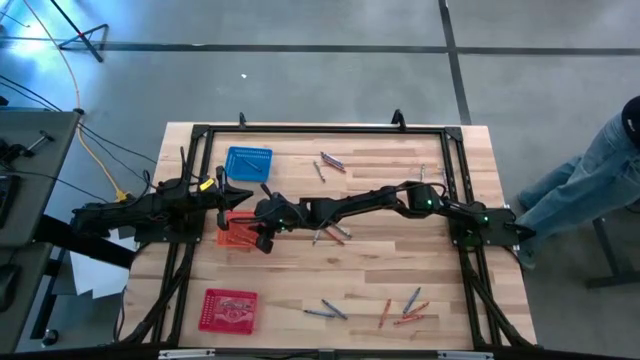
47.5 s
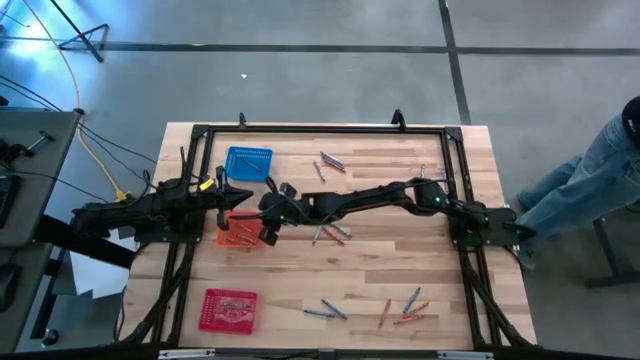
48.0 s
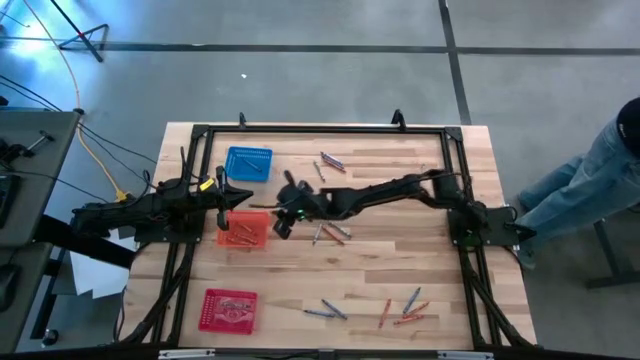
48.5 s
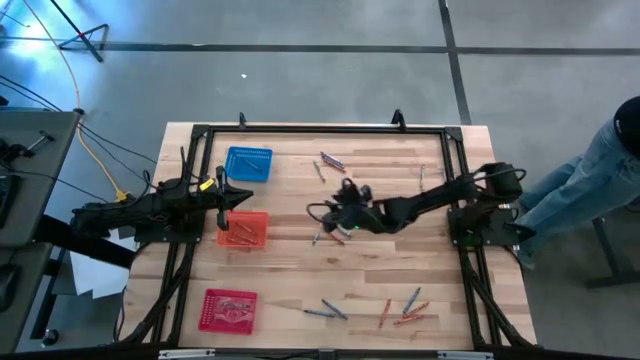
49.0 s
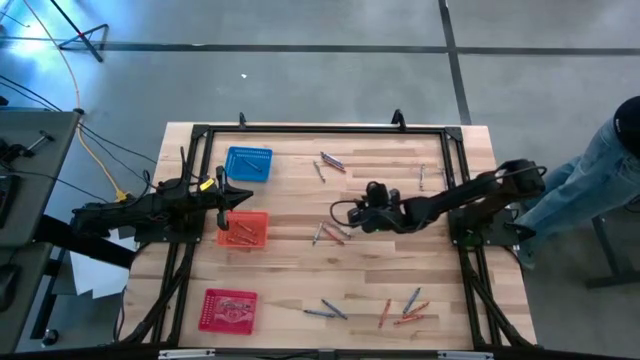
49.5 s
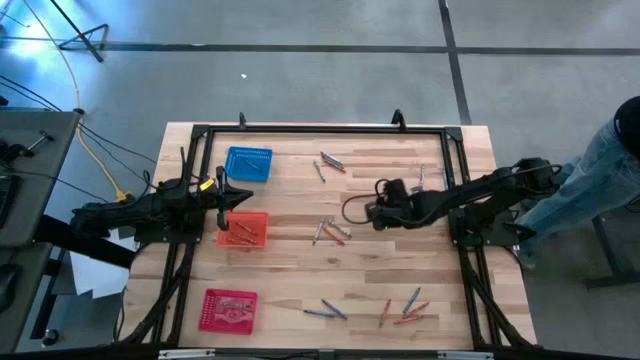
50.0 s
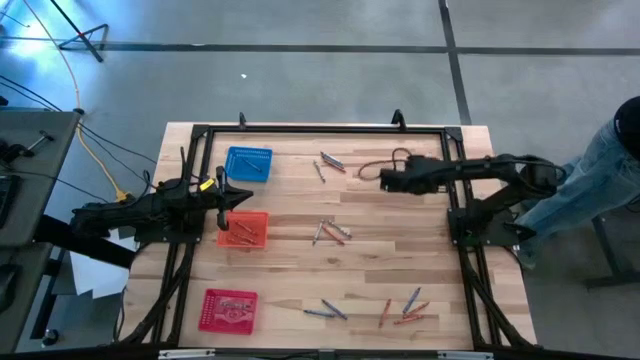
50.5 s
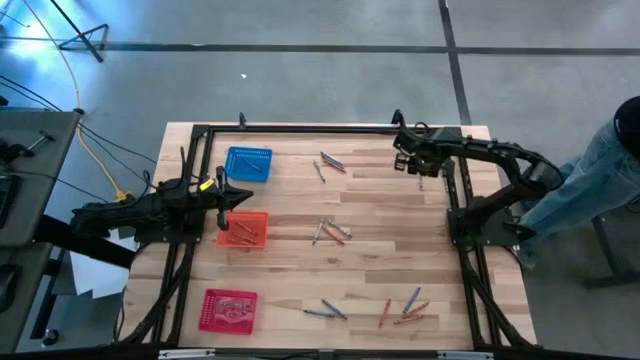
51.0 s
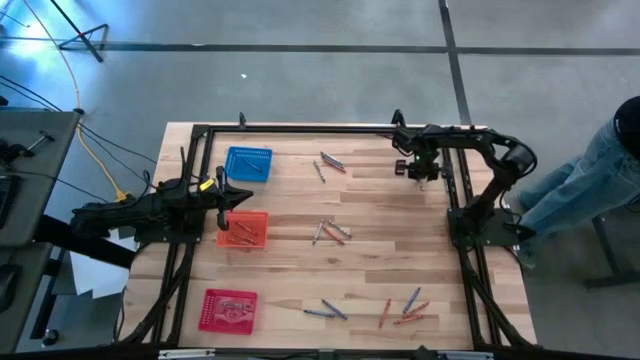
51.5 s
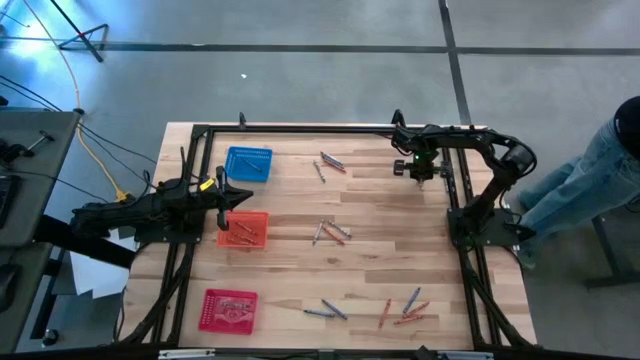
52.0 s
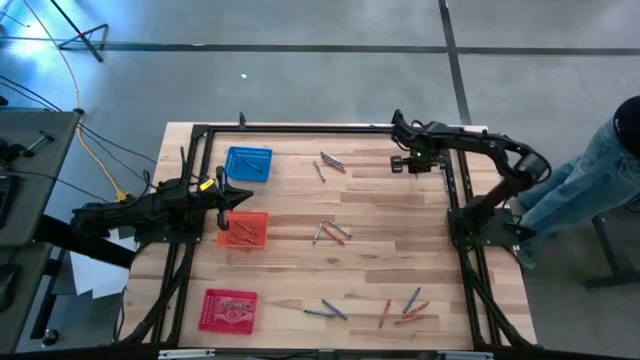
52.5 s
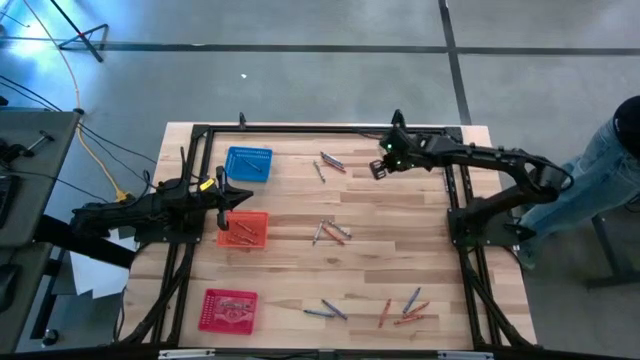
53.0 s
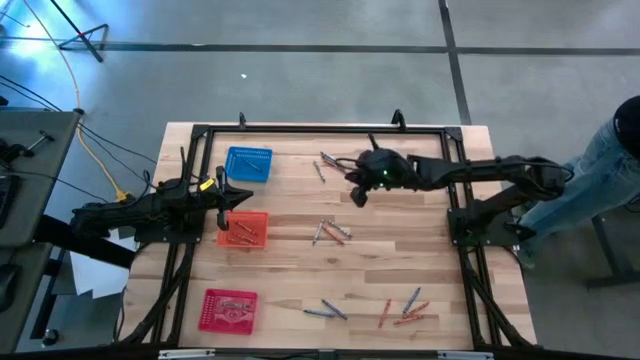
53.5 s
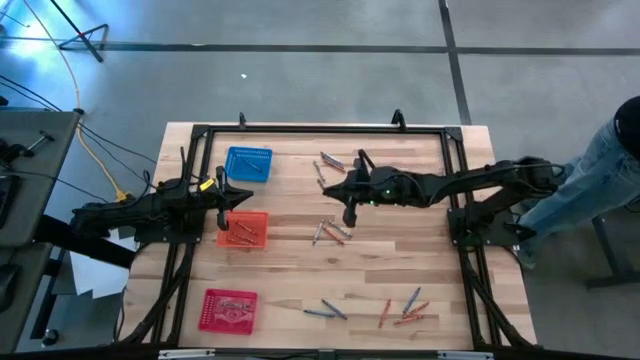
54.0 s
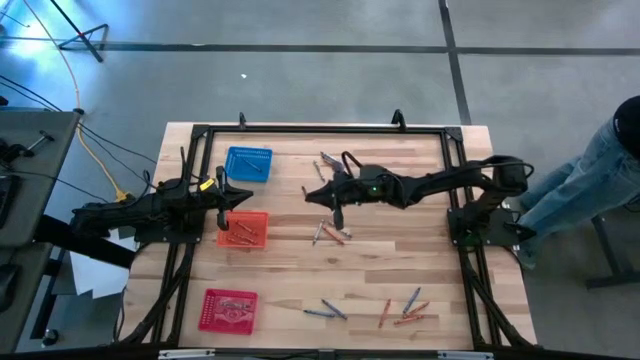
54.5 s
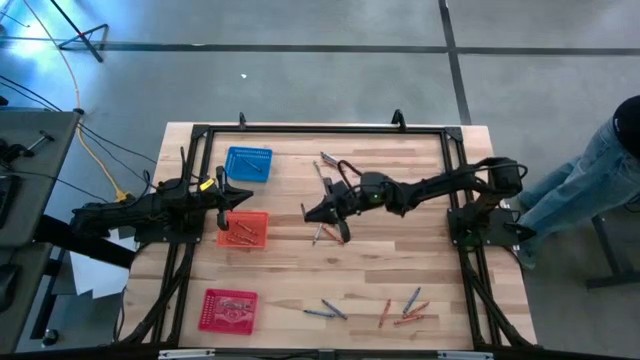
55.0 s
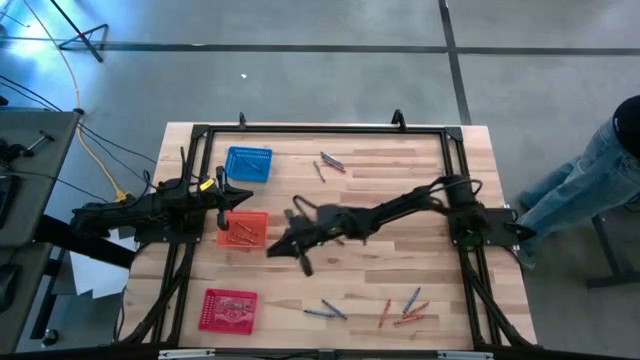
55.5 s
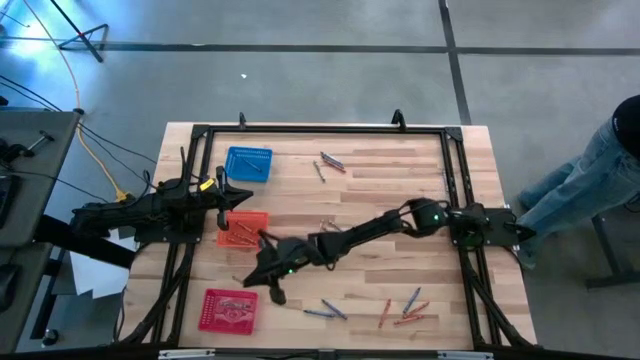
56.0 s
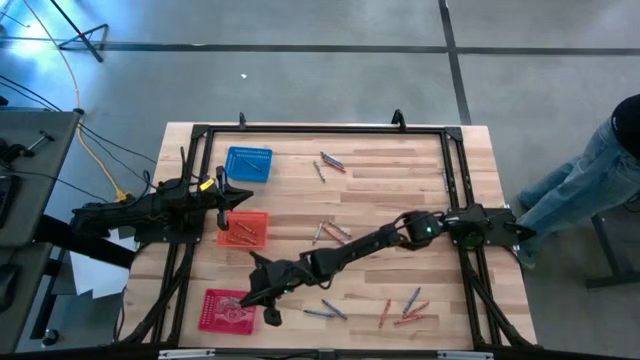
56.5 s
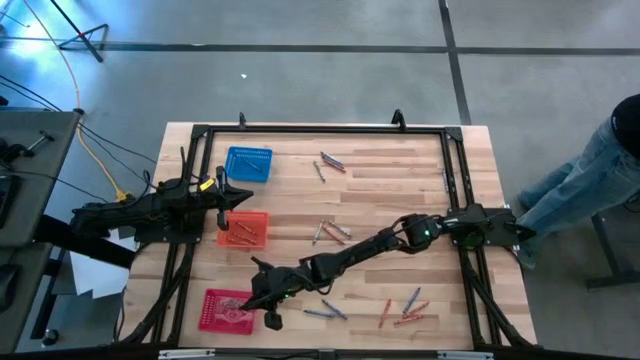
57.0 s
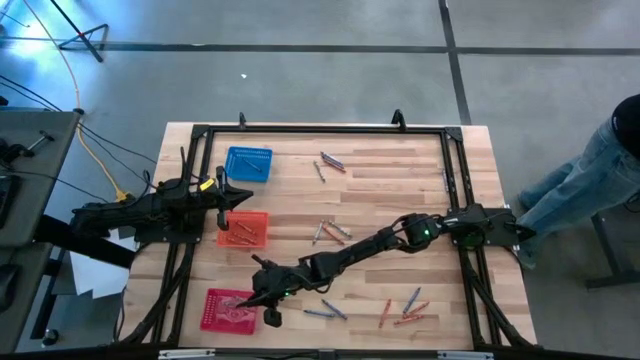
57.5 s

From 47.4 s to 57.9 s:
Task: Sort crayons
Put the gray crayon into the red bin

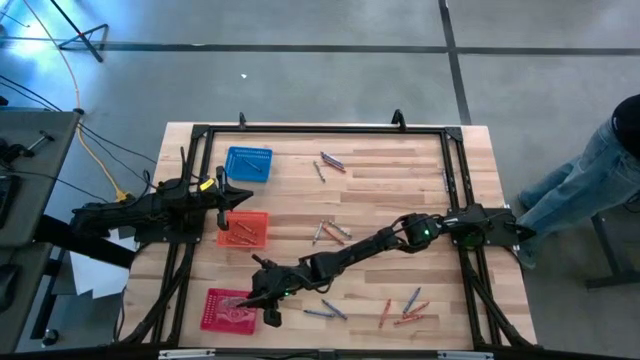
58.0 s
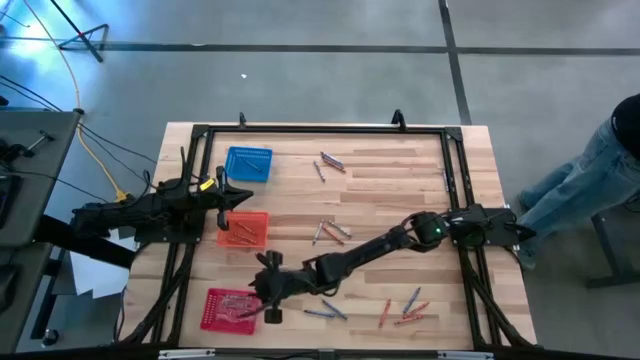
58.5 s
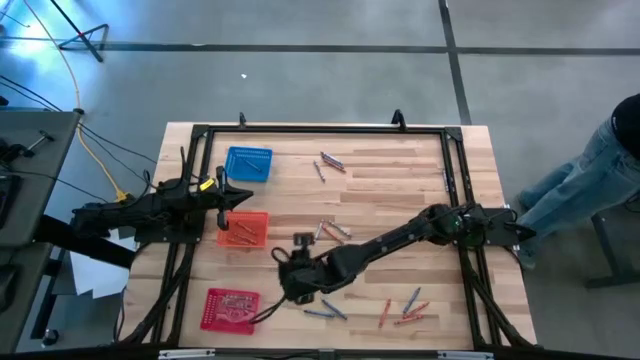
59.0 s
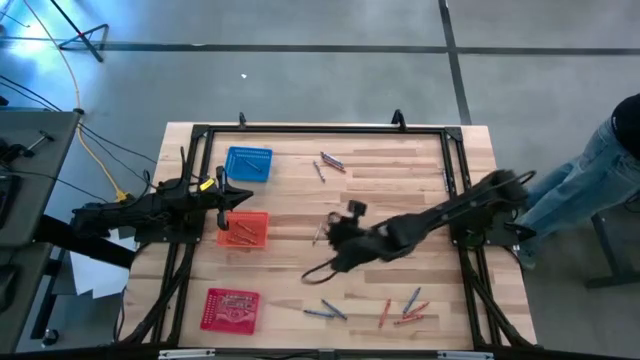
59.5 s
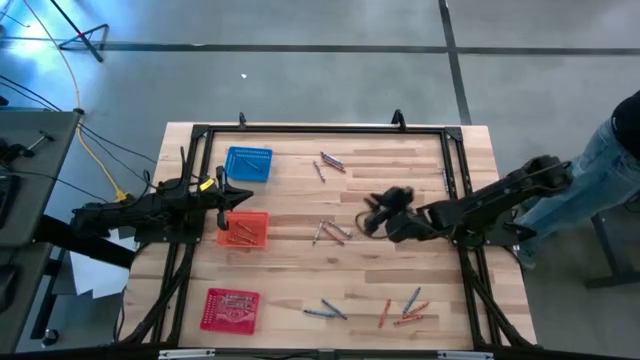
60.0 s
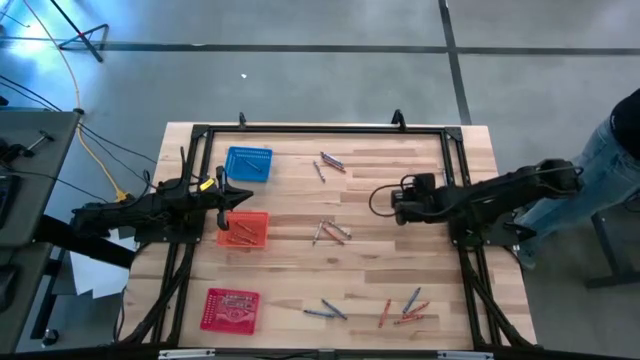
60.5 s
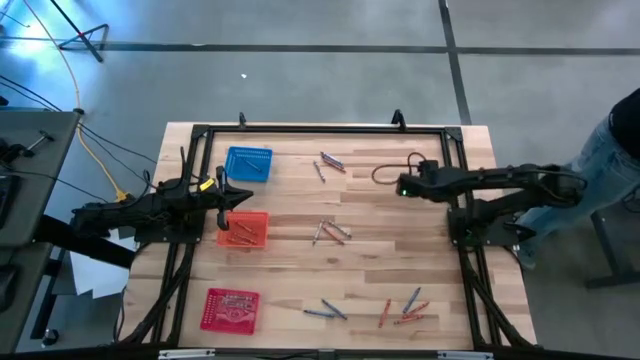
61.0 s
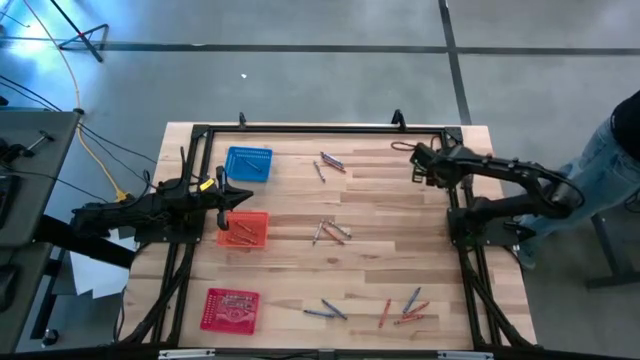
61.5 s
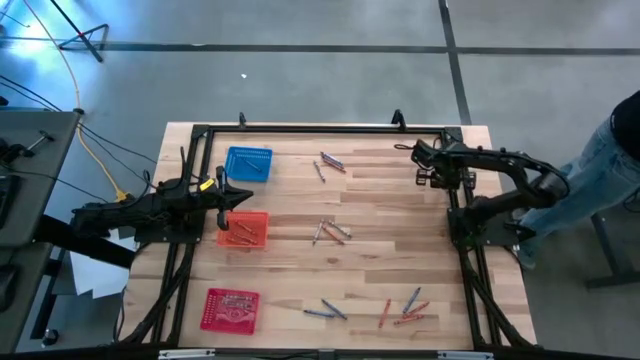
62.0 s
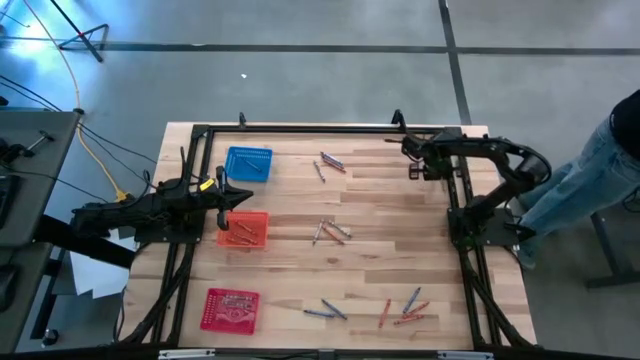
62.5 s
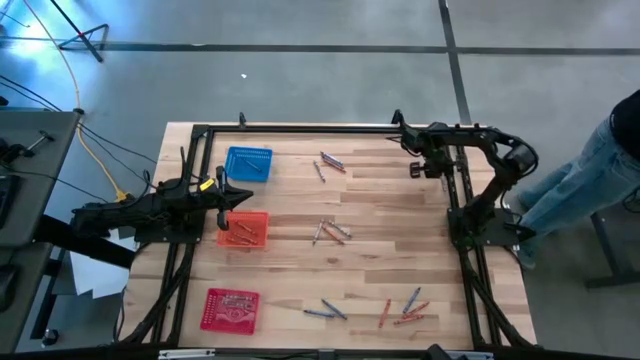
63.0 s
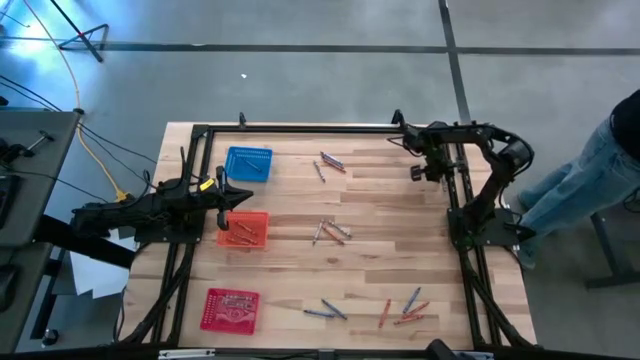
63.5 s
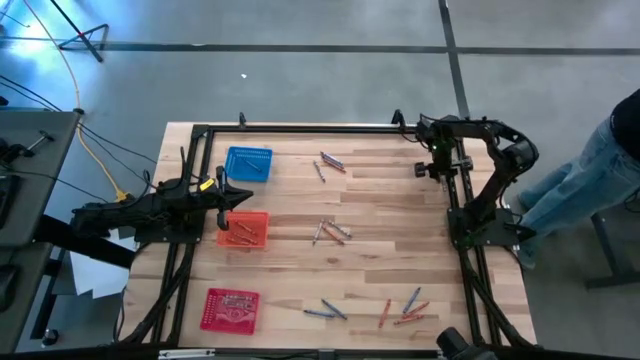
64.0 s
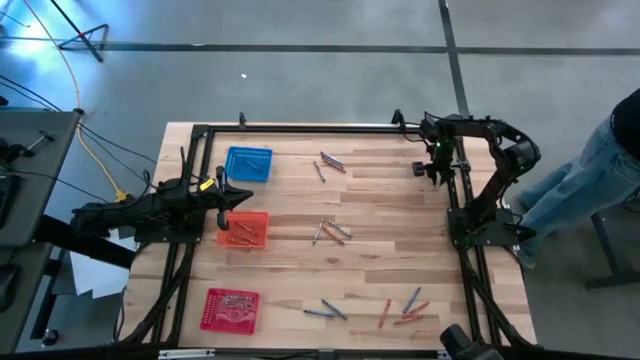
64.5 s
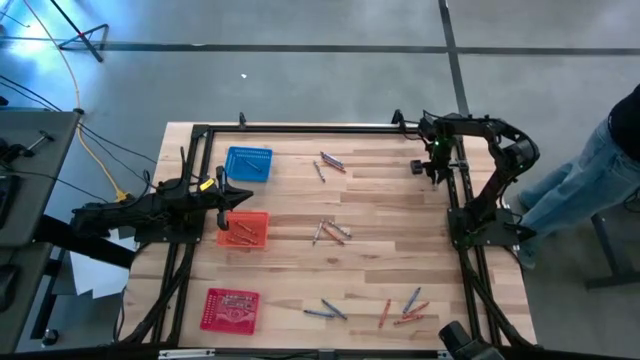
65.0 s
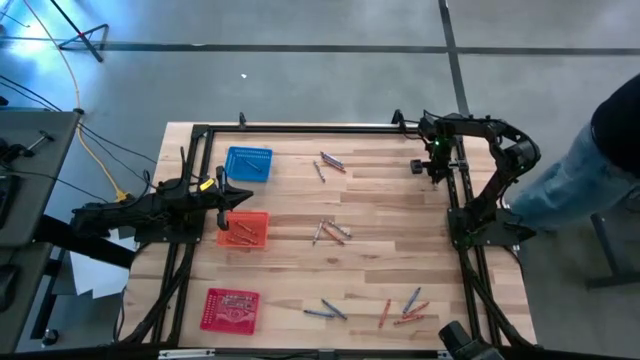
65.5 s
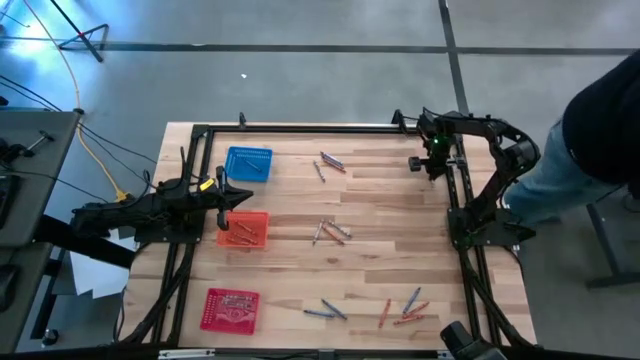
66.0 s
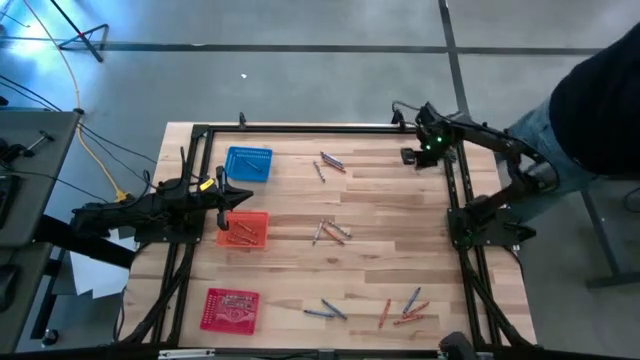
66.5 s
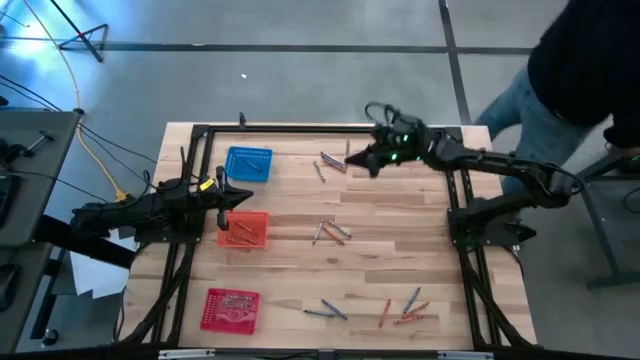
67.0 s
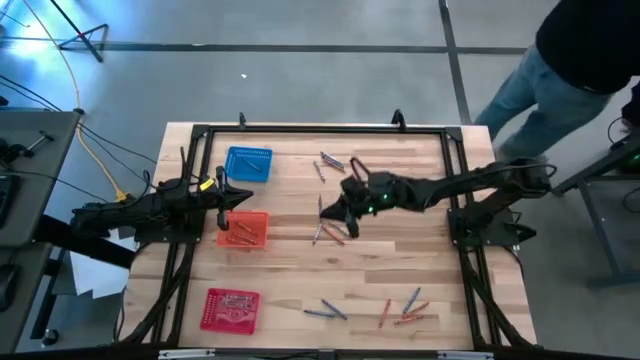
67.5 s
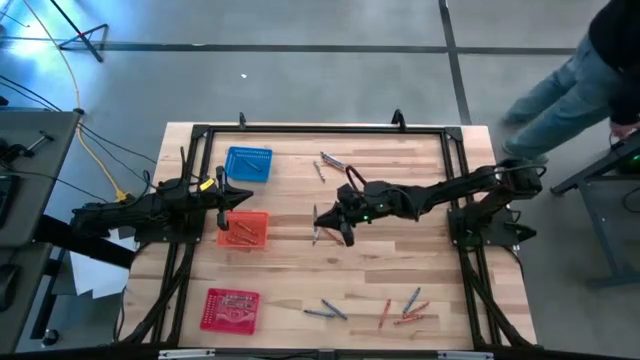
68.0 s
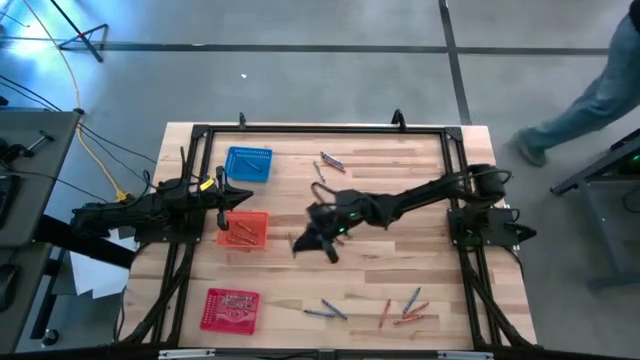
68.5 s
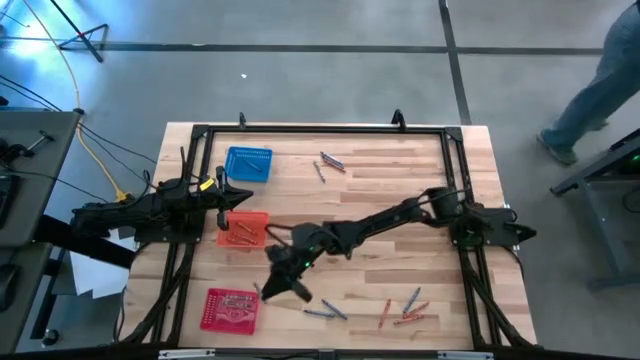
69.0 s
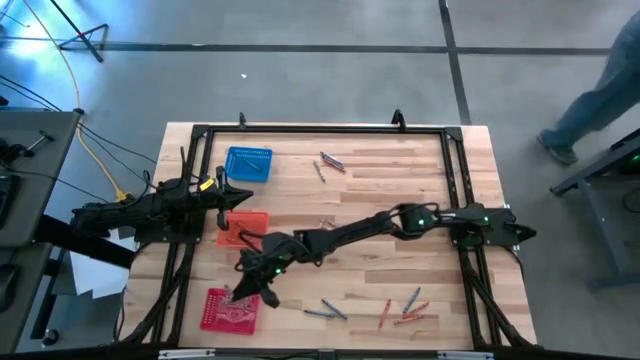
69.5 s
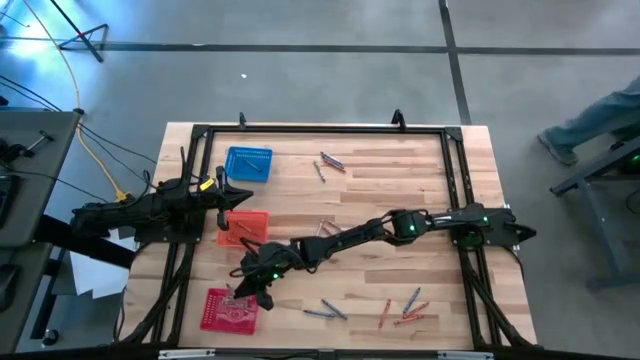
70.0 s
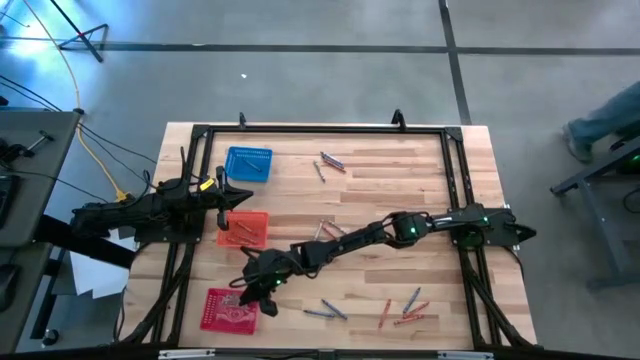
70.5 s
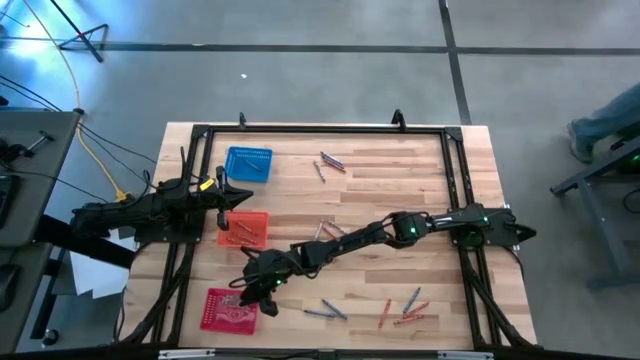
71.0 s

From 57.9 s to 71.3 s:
Put the gray crayon into the red bin
